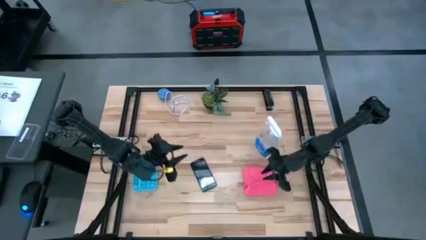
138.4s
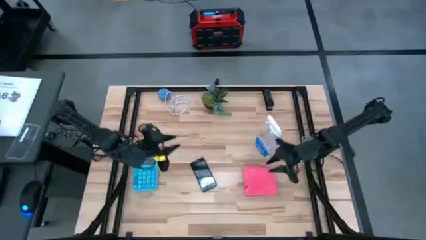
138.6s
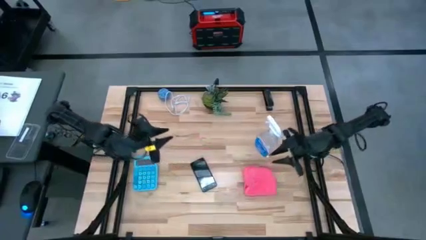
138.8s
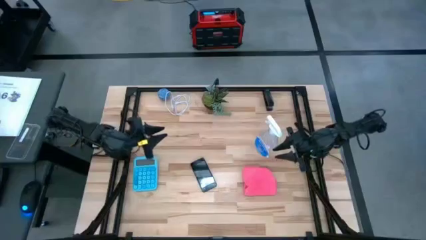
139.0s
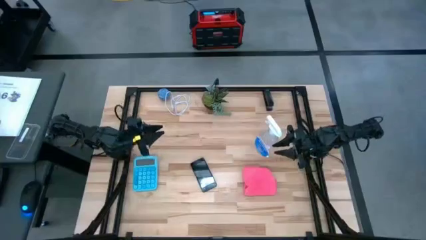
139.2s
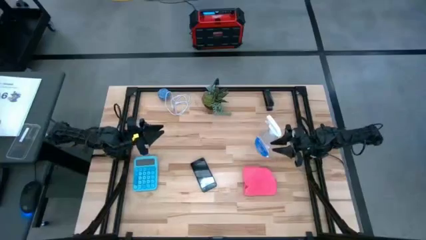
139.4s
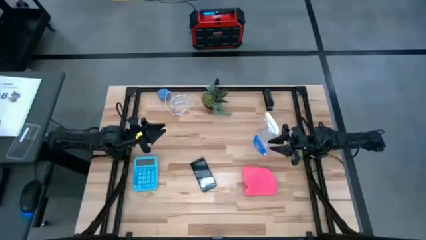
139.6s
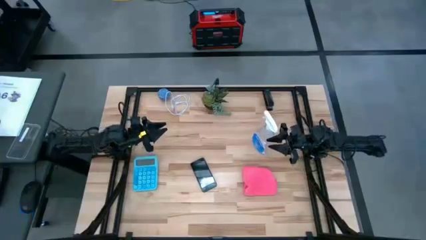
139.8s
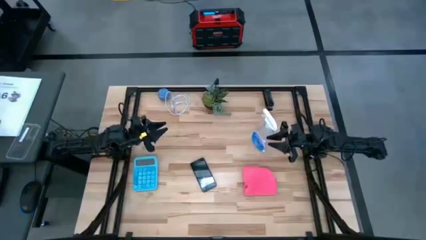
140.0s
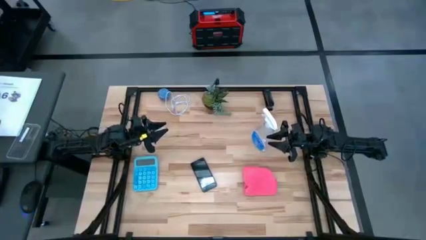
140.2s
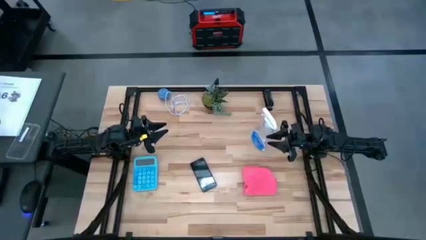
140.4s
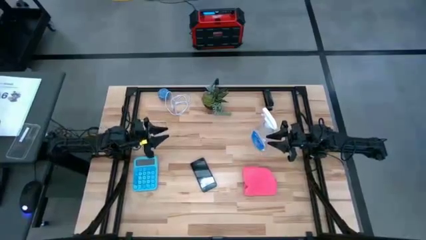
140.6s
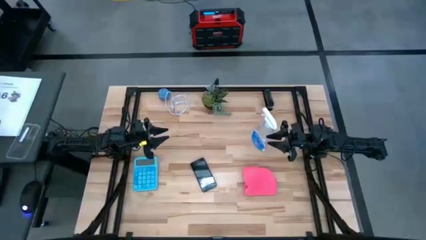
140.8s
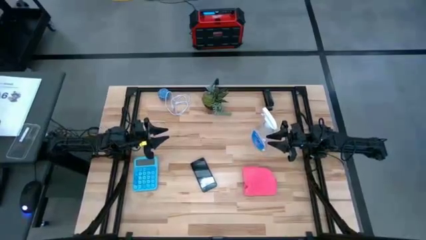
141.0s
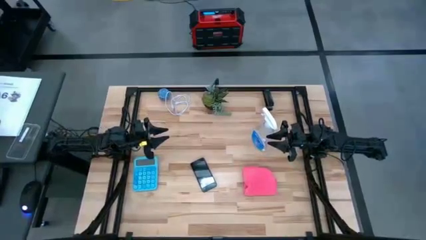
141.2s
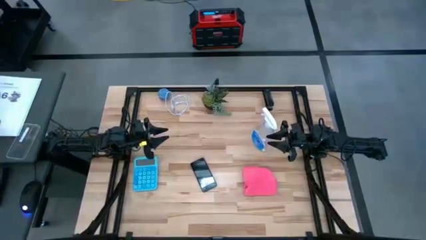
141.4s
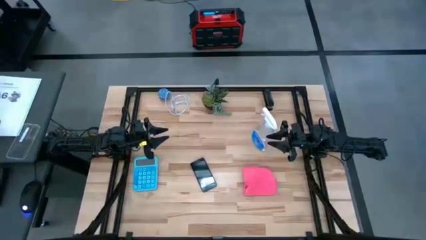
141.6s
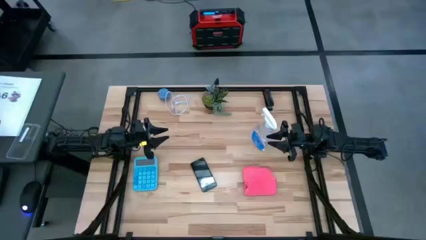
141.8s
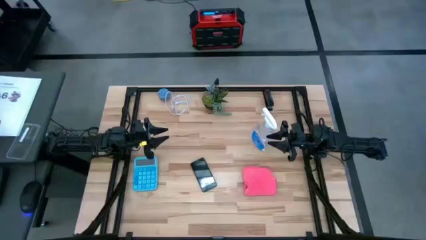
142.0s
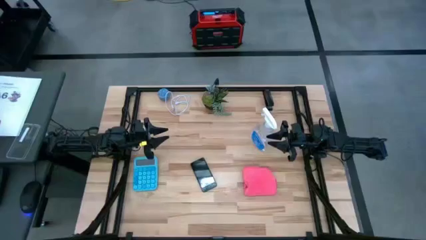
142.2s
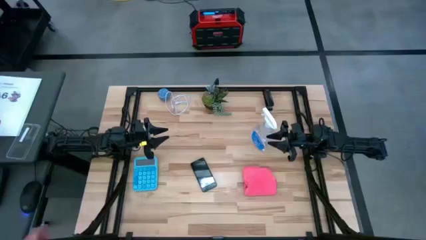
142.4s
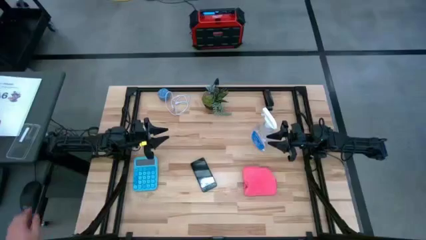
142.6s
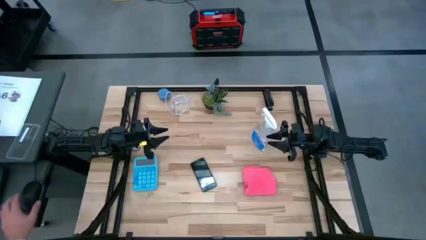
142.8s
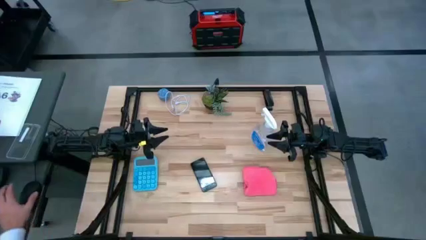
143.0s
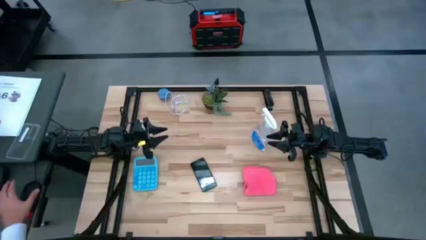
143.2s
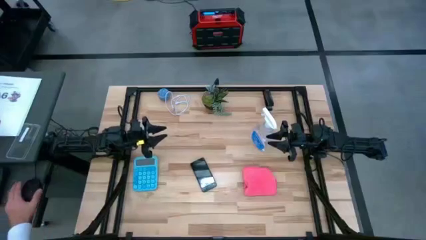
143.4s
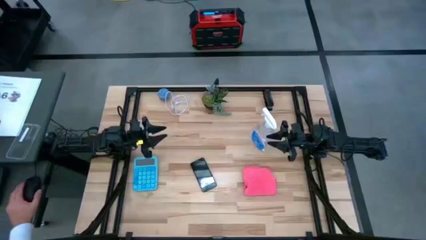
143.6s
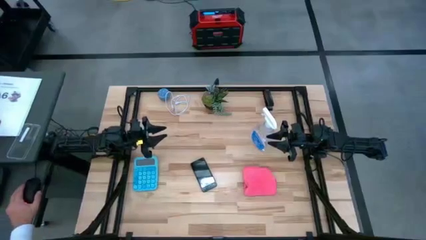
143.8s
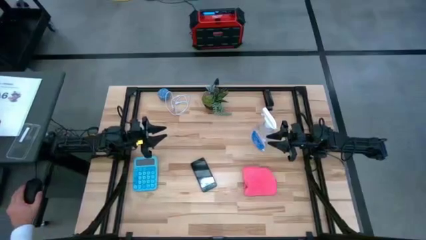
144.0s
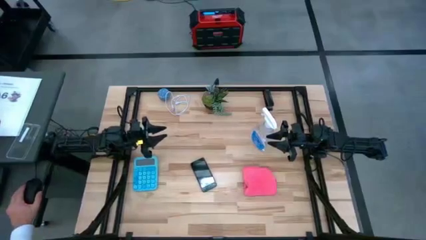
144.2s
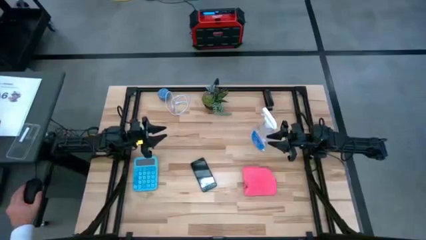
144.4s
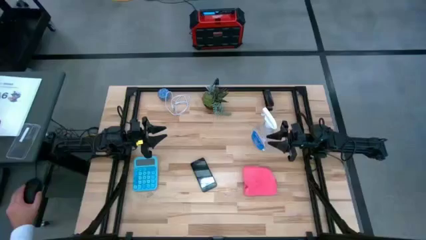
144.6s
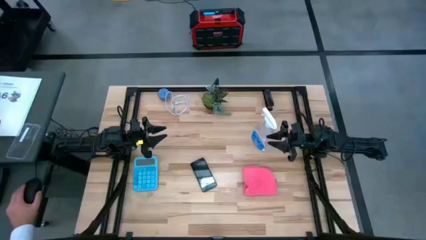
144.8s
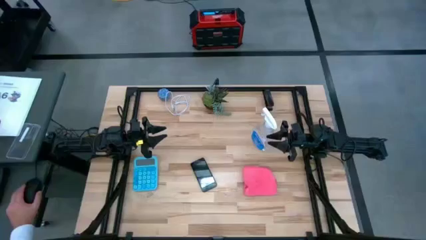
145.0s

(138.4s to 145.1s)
Task: Apply microfiber cloth
Return to Home Position

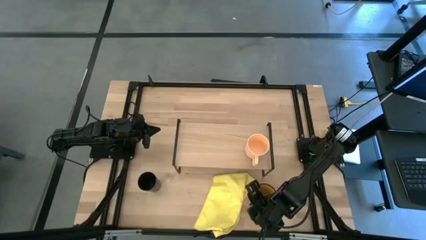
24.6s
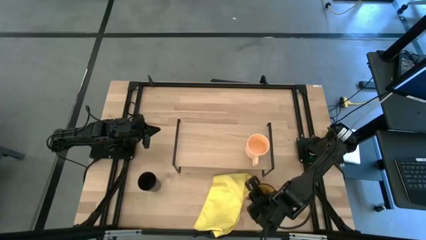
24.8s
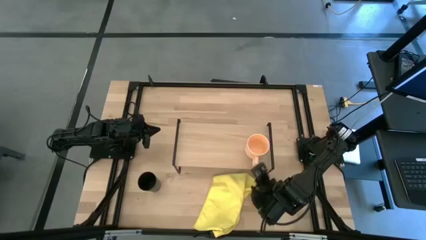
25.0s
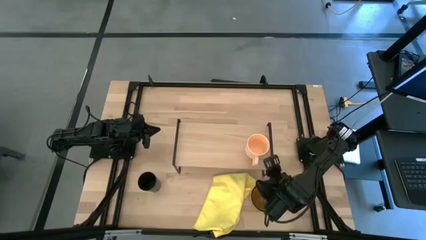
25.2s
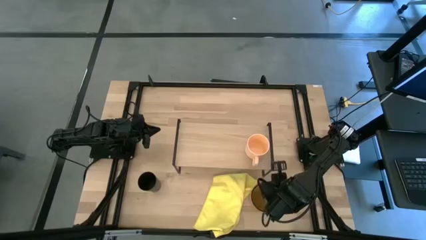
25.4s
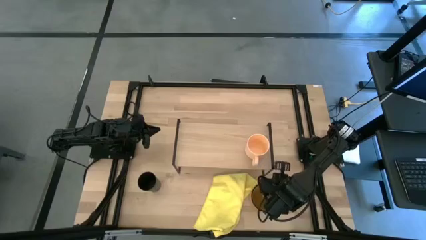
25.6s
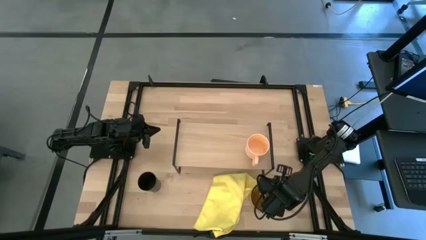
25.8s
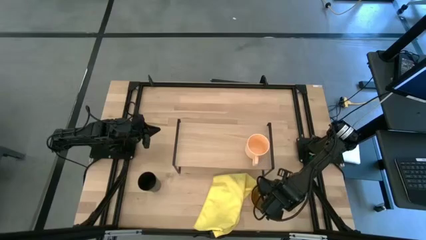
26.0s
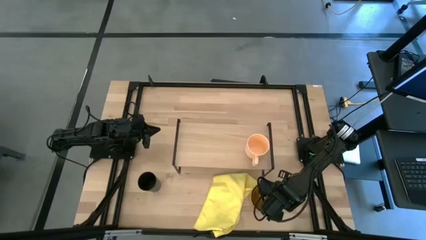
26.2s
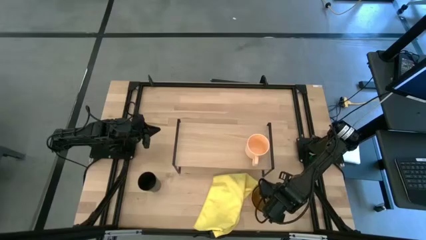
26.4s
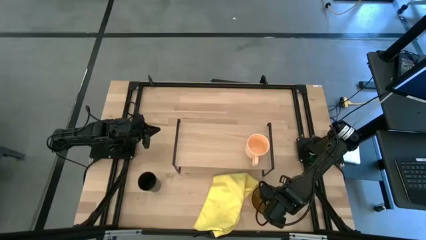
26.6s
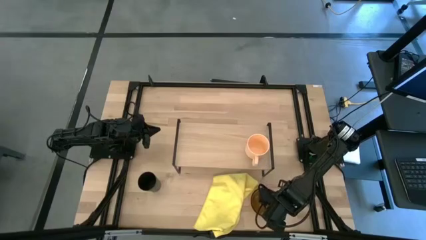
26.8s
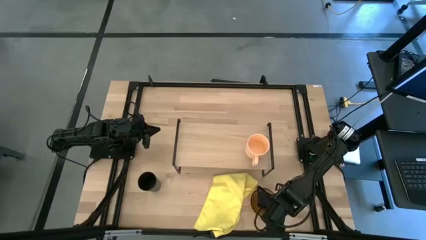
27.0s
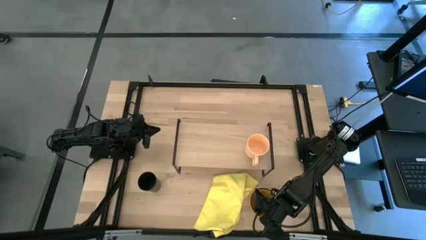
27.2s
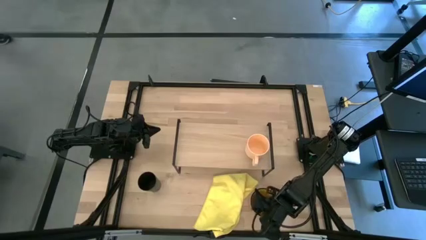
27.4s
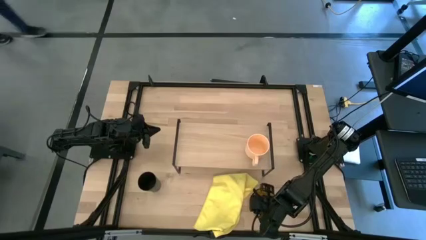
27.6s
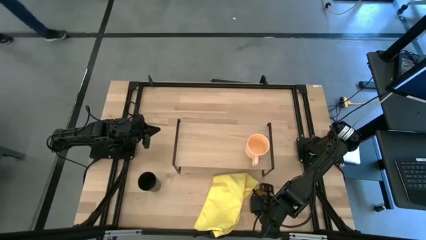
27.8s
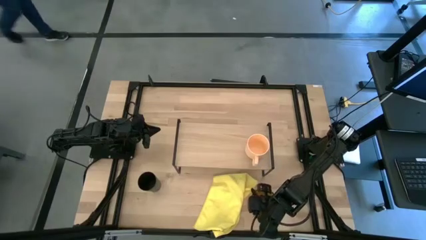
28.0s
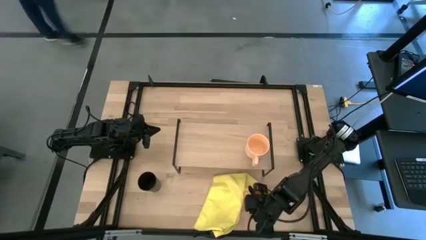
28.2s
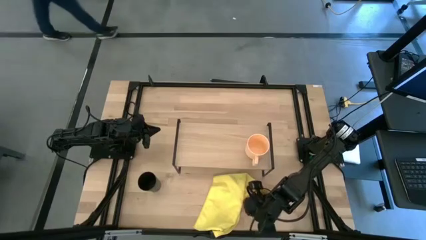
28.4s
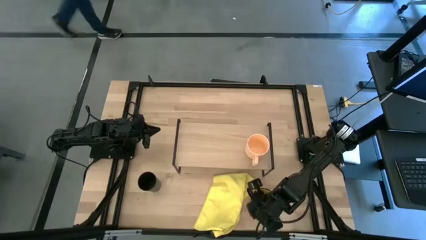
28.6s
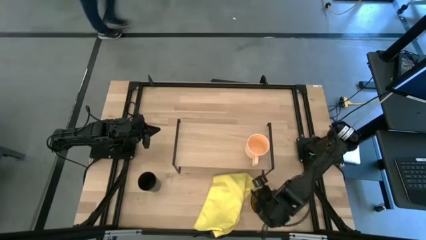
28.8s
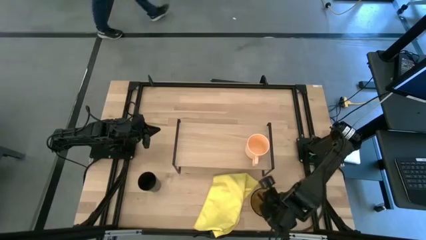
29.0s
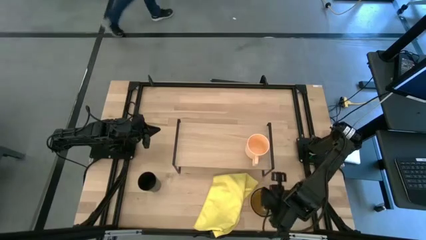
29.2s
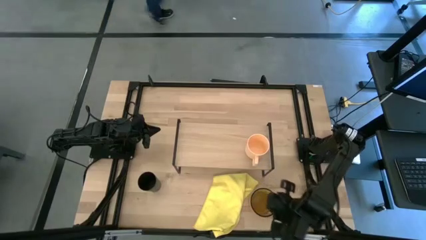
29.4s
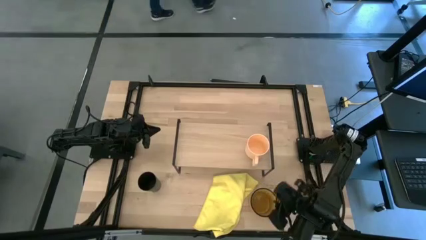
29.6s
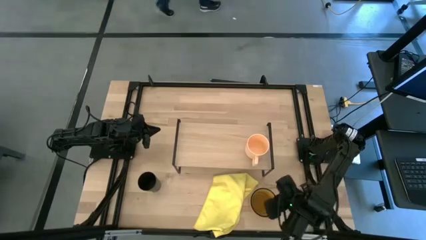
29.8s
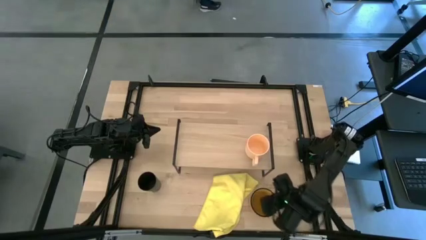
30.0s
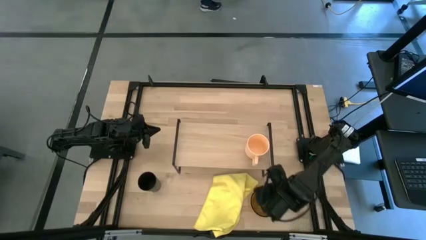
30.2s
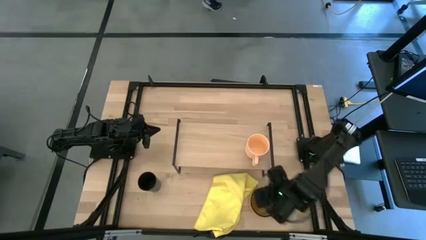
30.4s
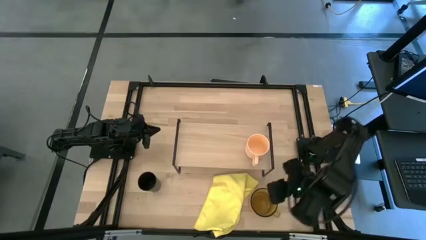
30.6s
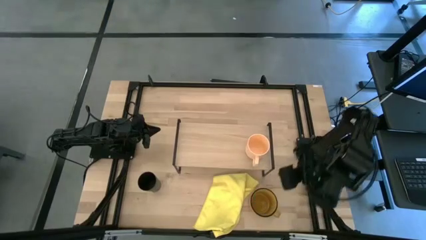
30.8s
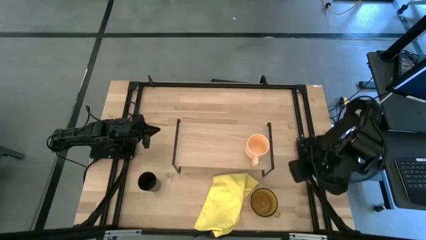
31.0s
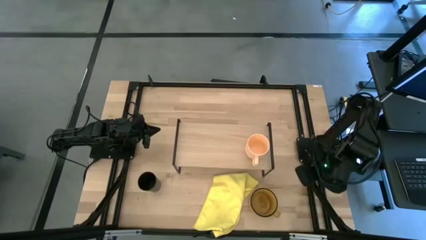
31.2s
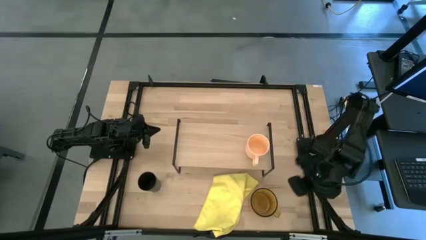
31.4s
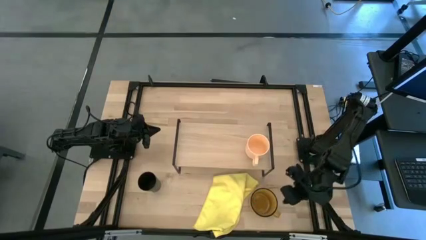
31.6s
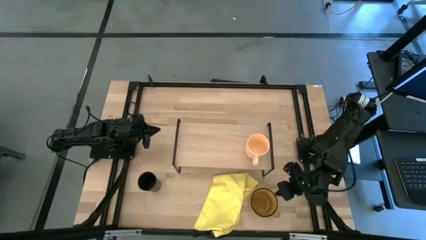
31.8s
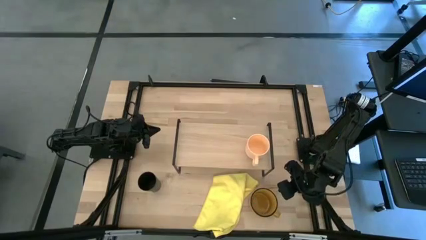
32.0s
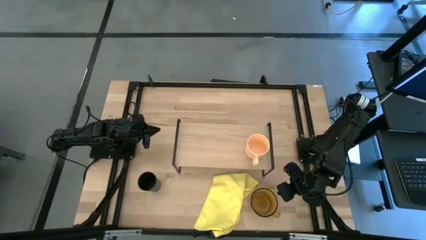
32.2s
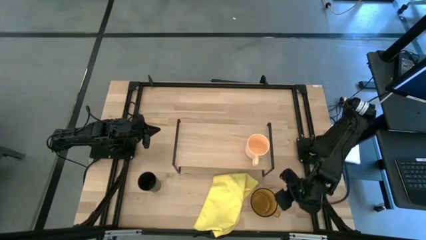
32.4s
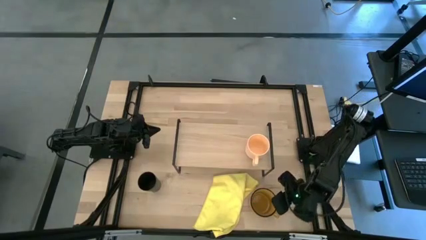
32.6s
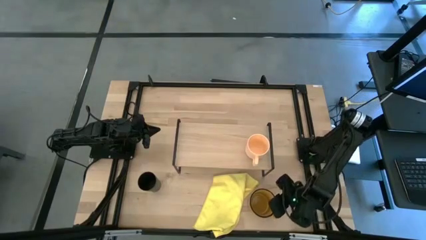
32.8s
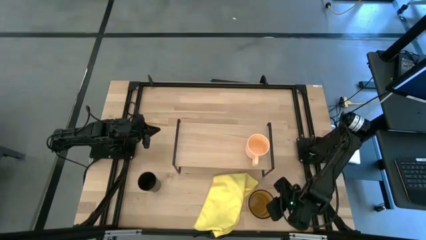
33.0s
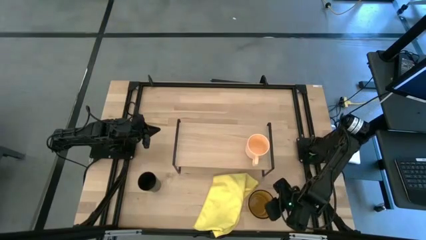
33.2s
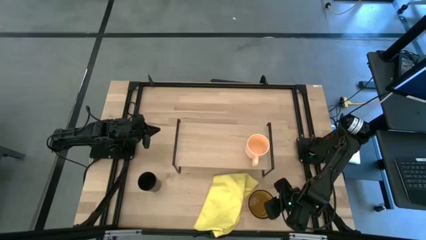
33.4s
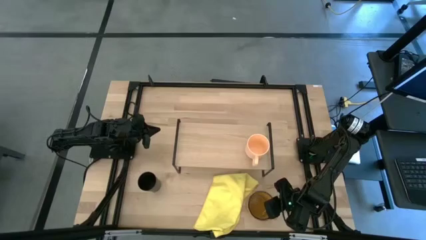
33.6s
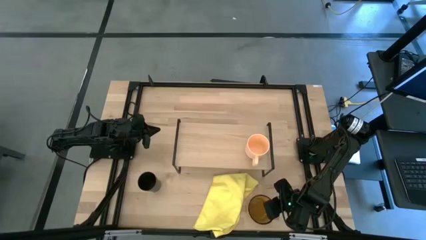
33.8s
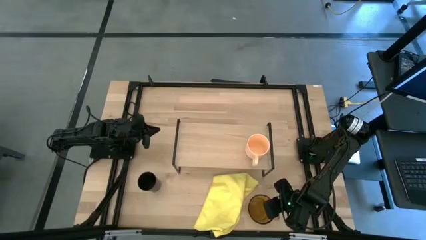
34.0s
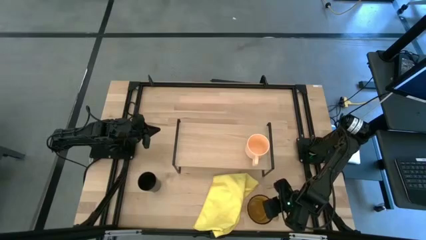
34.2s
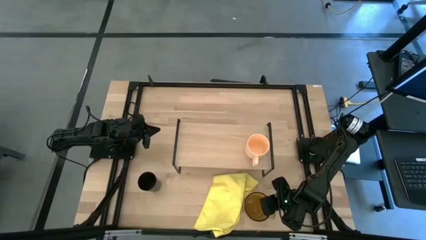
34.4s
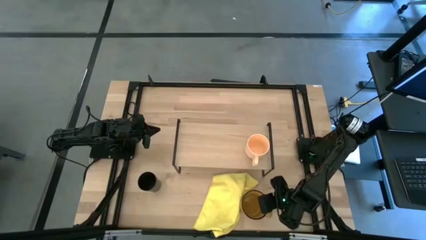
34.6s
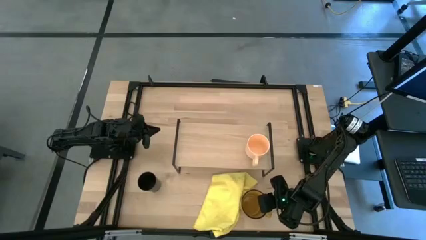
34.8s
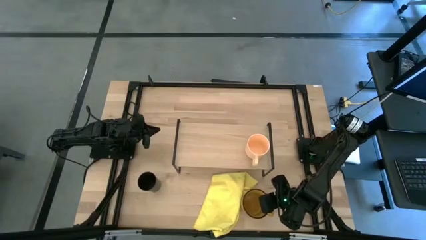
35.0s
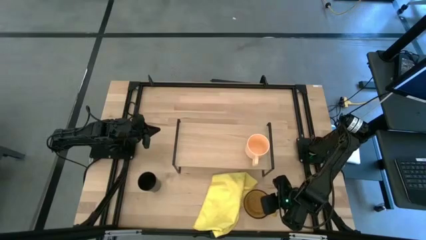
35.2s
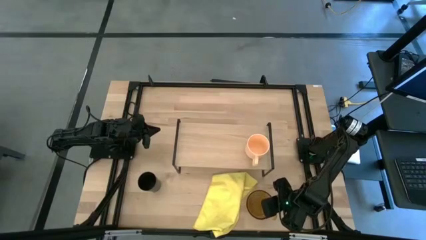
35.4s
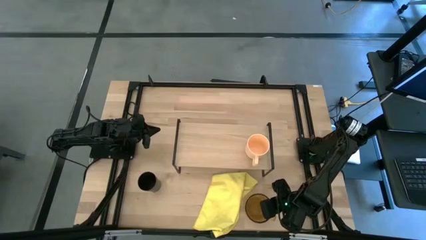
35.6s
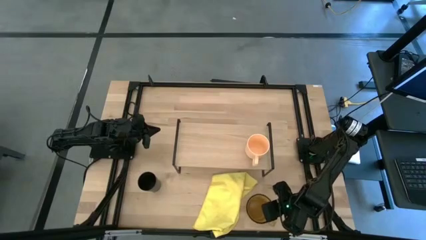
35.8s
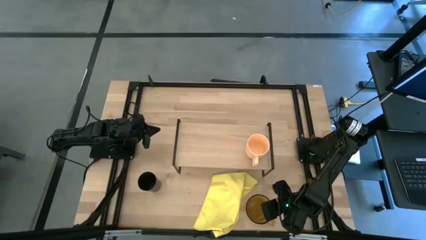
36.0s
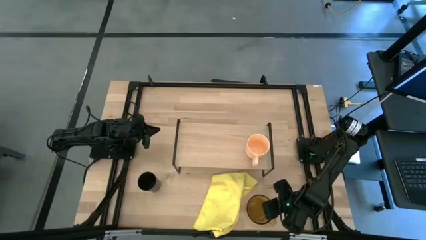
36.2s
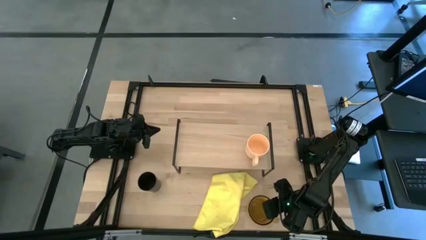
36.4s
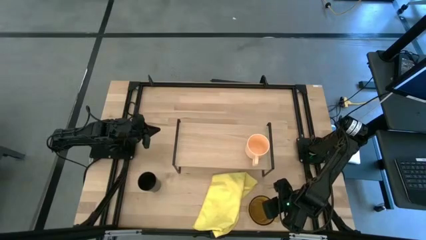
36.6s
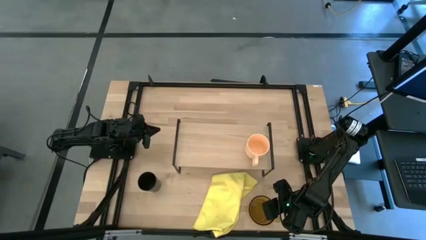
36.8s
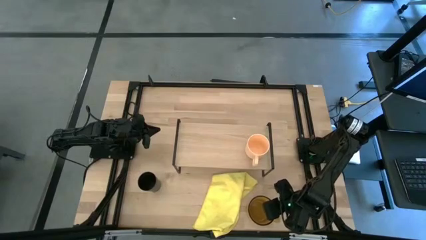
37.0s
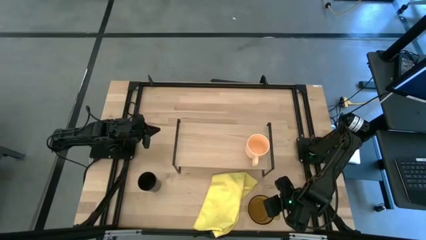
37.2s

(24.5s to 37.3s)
Task: Stack small to large cups/mugs on shelf
Put the yellow mug on the shelf
